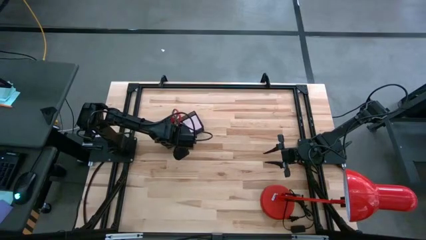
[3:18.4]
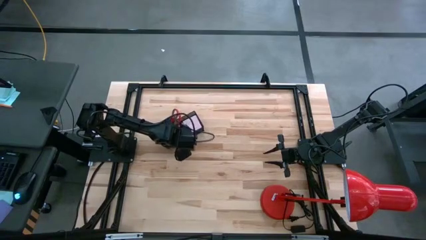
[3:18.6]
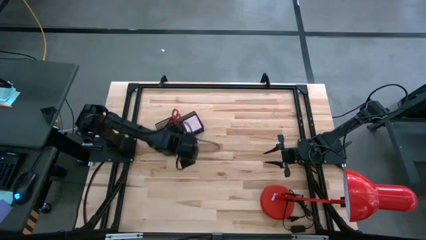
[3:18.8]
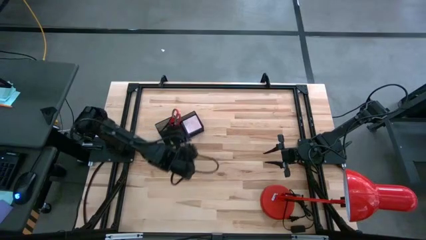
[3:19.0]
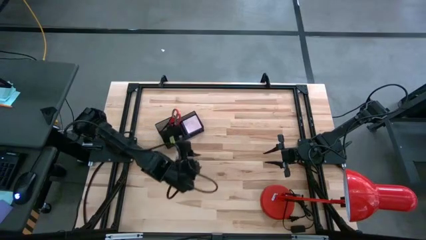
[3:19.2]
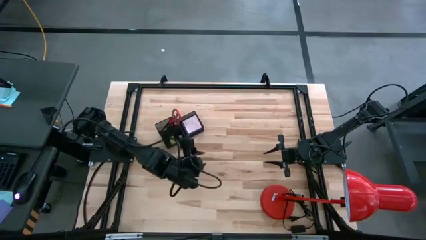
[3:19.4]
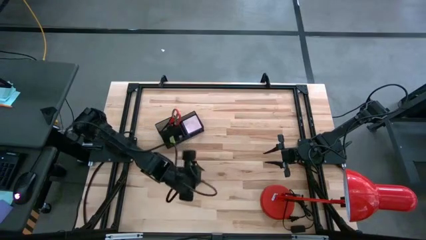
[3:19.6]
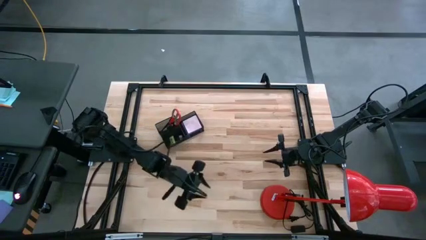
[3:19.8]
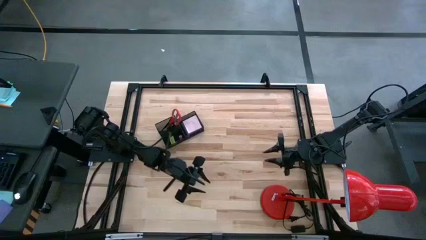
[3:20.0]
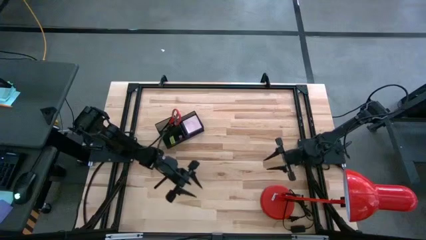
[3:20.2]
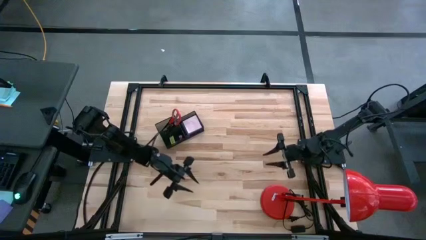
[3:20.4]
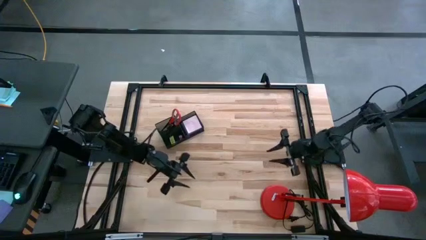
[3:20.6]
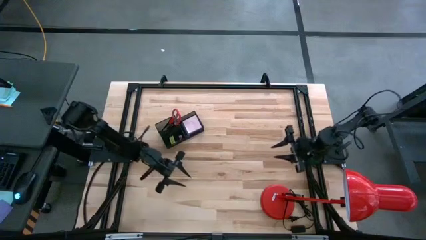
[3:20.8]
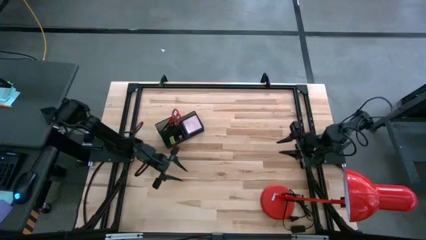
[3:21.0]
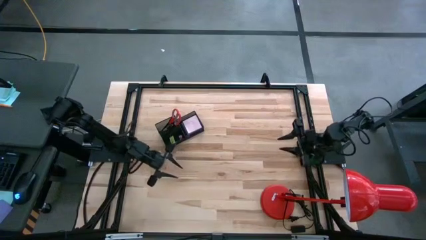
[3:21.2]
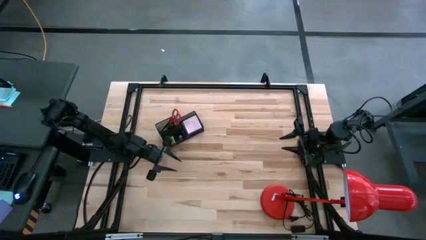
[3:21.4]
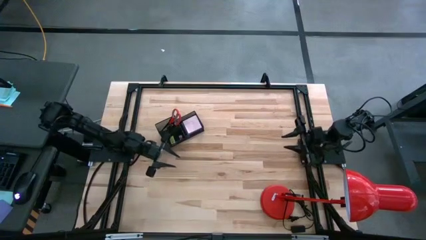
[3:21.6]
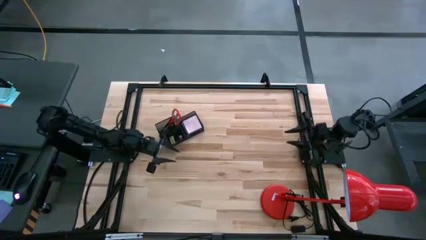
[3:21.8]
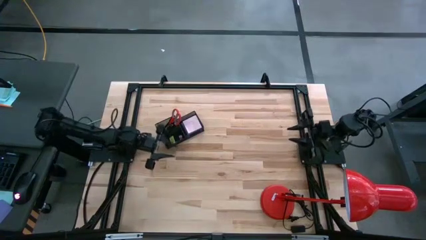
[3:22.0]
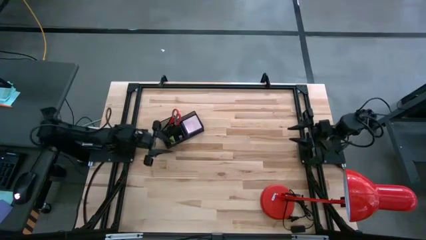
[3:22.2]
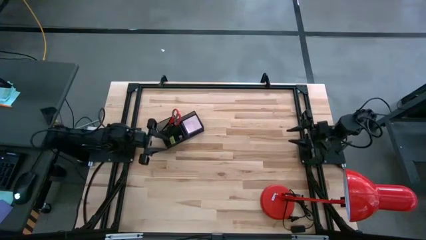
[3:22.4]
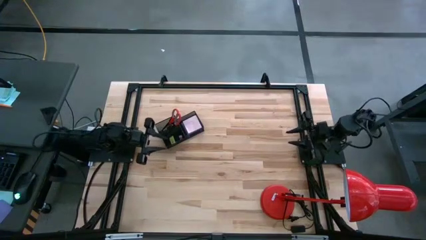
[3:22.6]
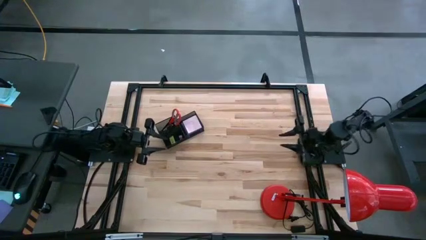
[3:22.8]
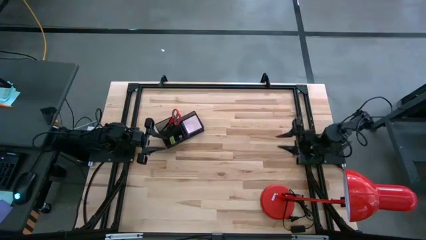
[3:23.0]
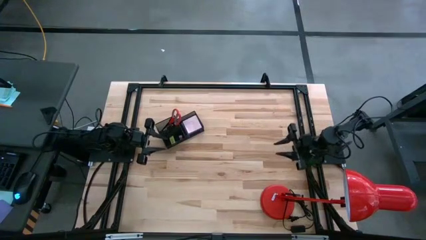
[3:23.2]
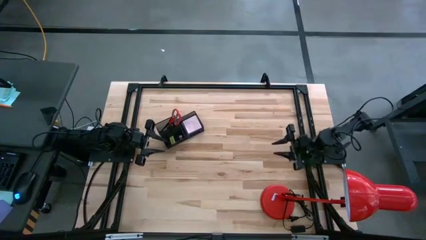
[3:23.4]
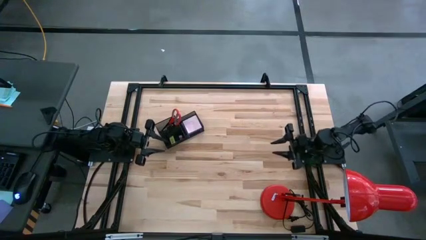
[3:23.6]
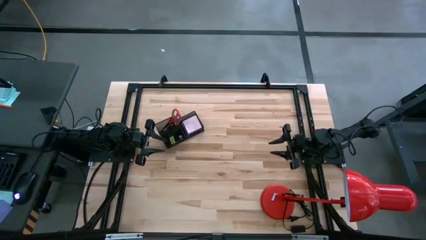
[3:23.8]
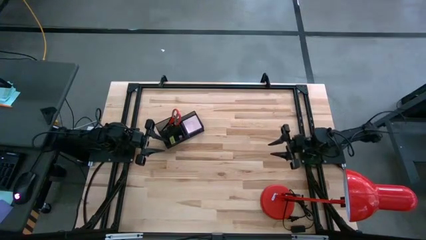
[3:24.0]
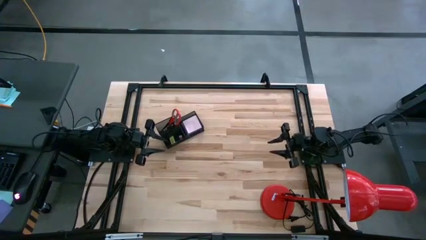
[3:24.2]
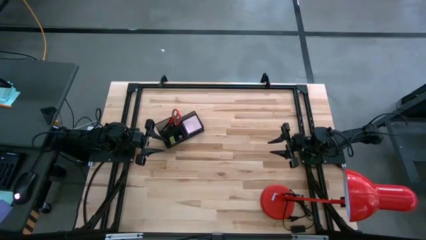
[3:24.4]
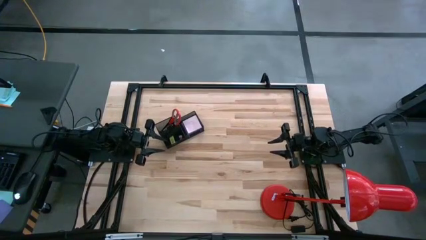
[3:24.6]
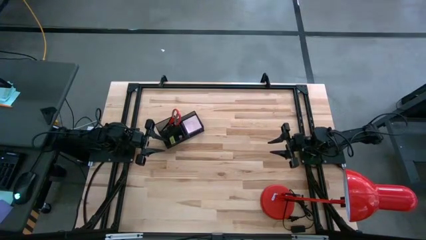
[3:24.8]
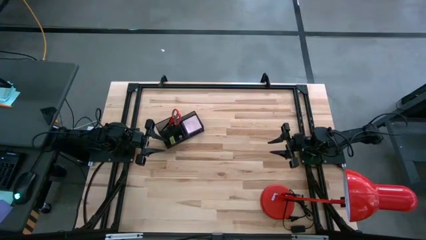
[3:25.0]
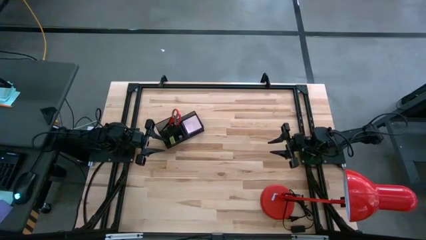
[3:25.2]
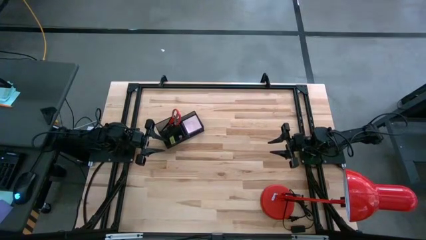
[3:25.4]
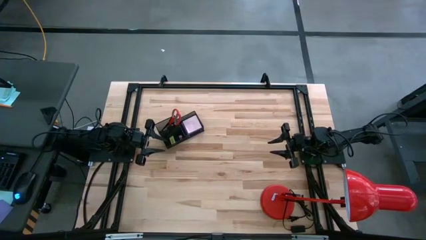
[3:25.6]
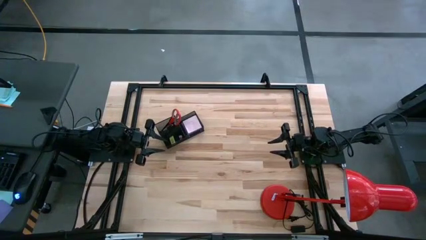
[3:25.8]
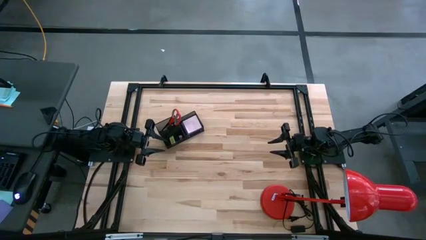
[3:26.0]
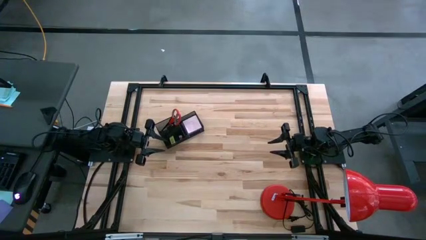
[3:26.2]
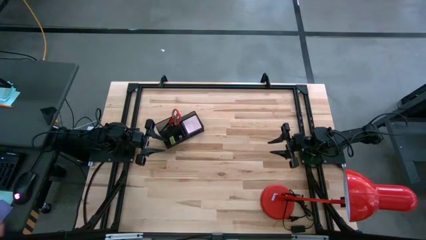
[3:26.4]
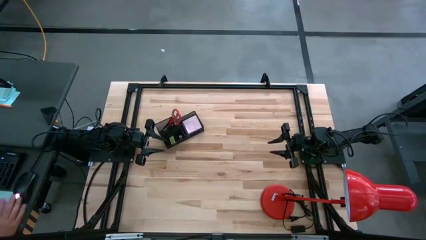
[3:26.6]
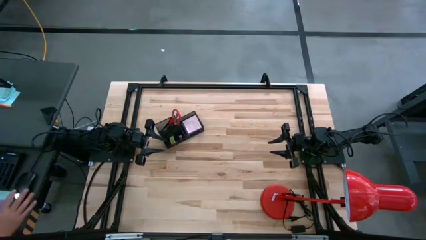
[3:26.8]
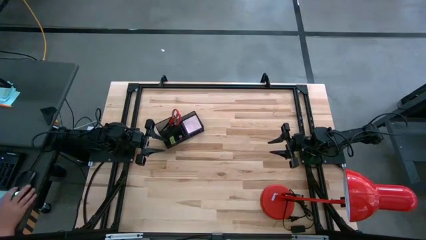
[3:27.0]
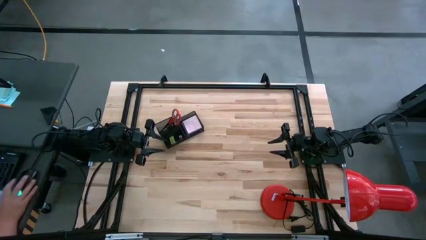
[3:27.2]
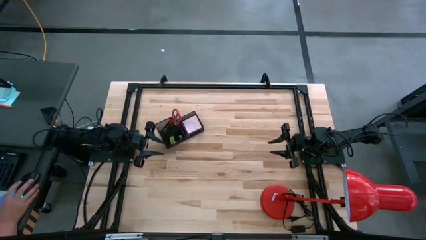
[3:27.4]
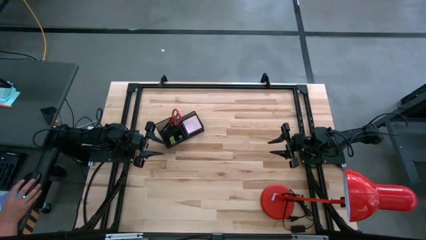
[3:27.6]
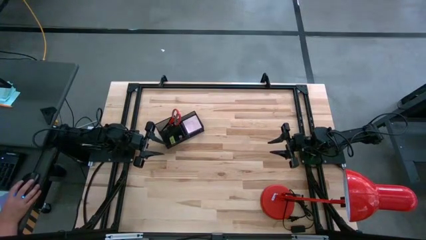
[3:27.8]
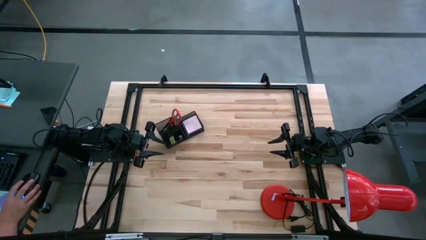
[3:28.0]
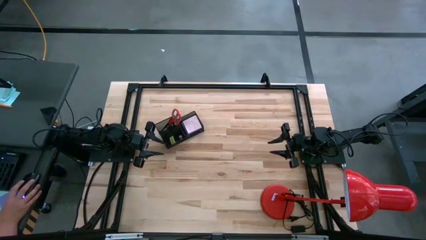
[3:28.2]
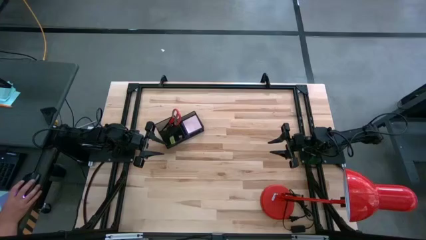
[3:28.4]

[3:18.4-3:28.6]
Task: Pick and place office supplies into organizer
Return to Home Position
